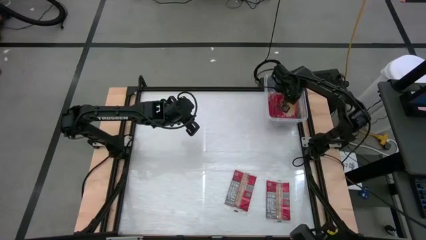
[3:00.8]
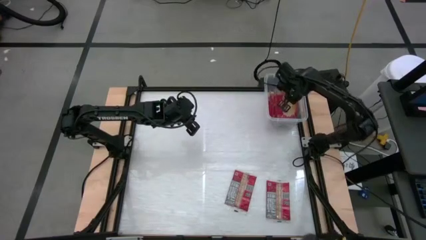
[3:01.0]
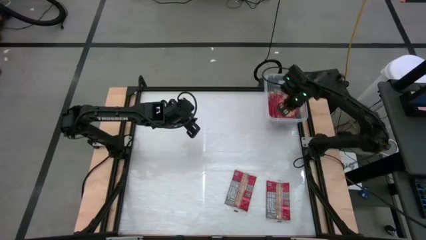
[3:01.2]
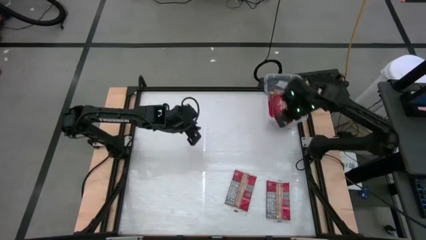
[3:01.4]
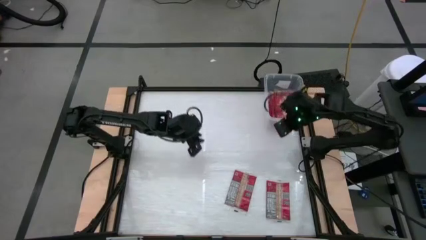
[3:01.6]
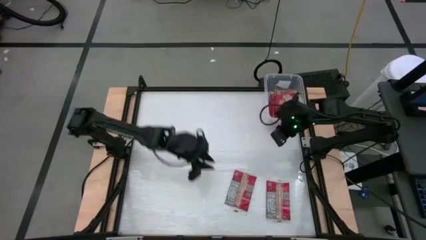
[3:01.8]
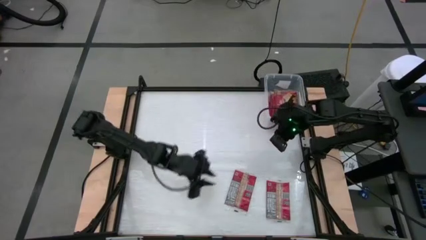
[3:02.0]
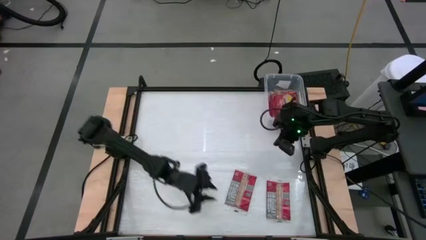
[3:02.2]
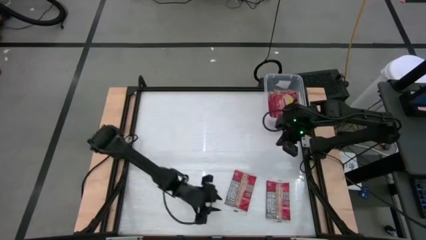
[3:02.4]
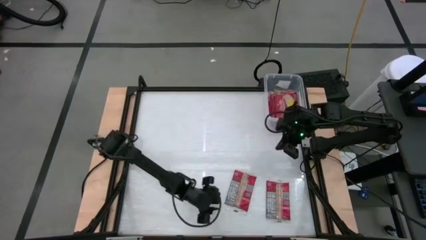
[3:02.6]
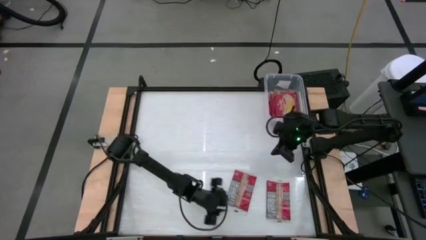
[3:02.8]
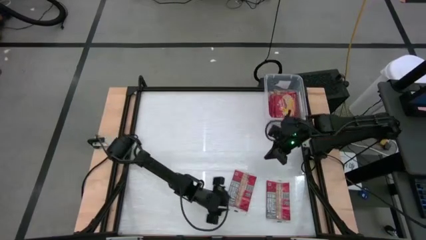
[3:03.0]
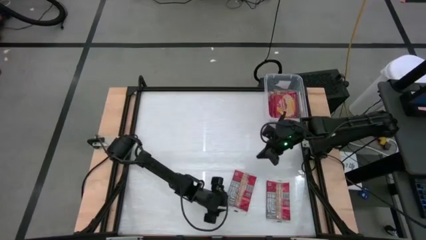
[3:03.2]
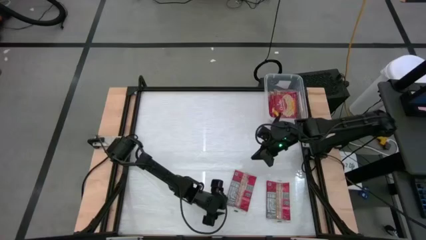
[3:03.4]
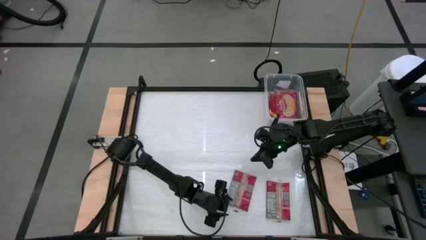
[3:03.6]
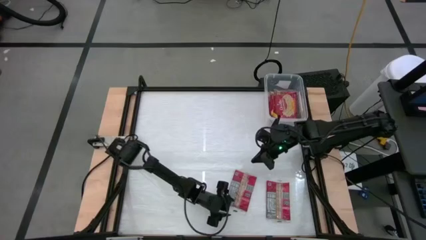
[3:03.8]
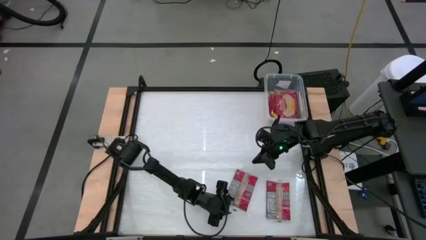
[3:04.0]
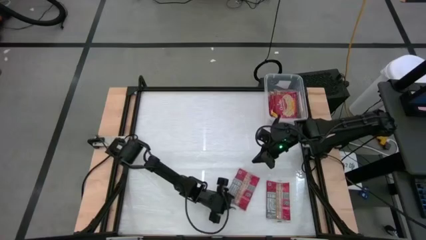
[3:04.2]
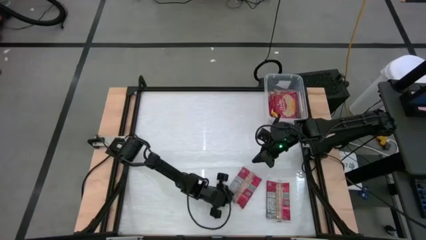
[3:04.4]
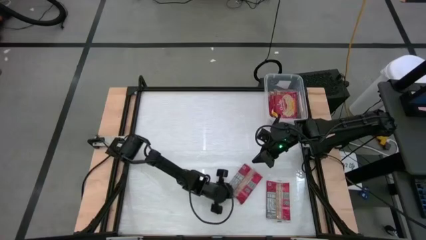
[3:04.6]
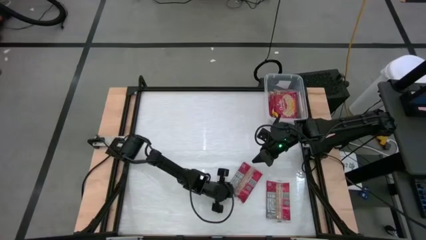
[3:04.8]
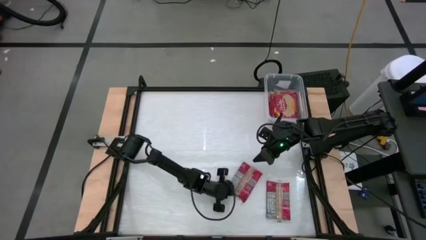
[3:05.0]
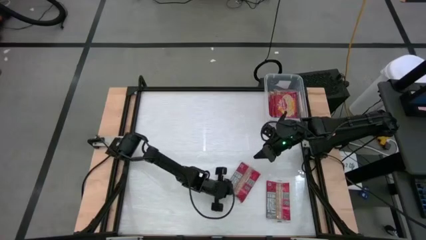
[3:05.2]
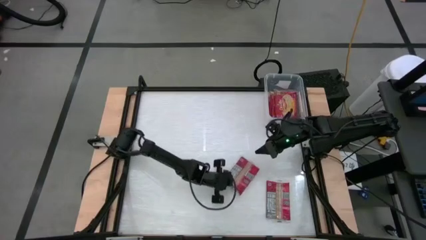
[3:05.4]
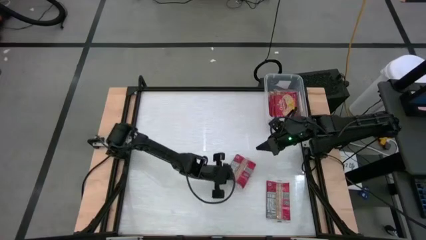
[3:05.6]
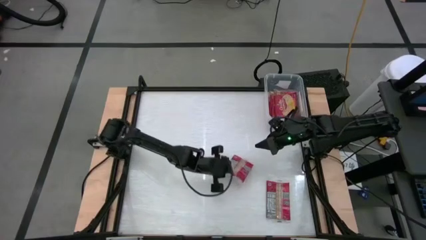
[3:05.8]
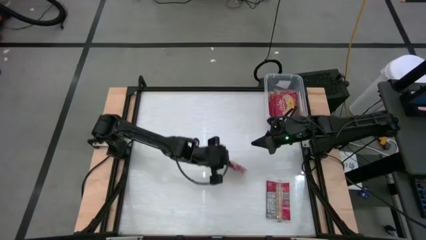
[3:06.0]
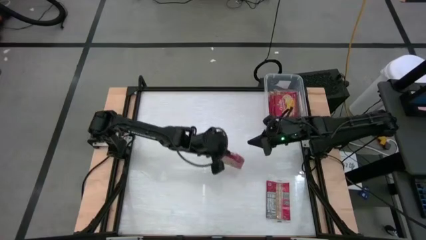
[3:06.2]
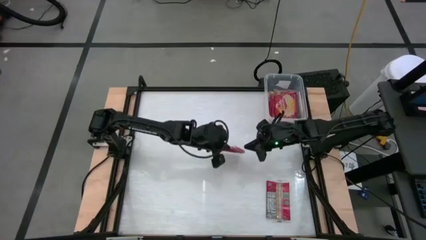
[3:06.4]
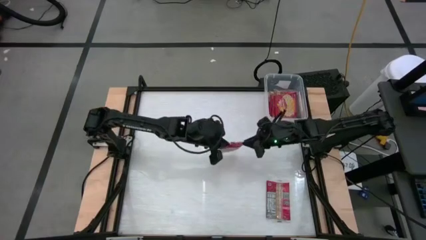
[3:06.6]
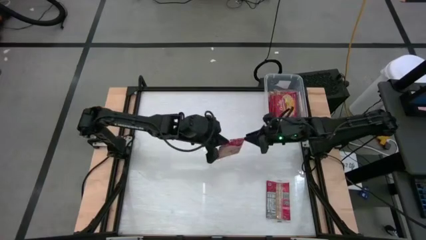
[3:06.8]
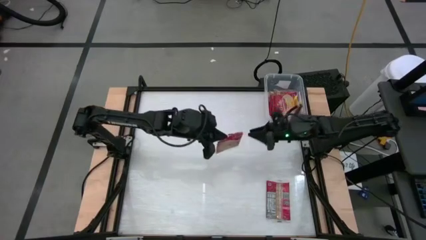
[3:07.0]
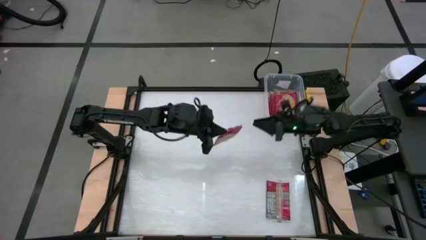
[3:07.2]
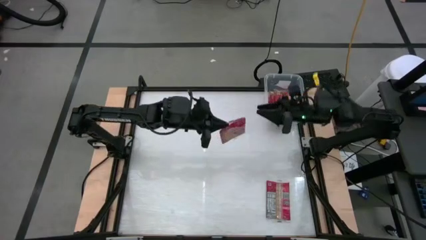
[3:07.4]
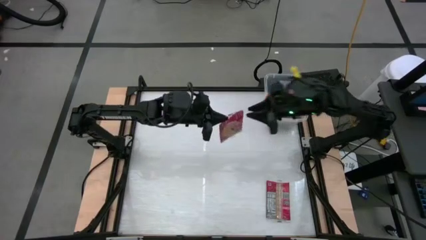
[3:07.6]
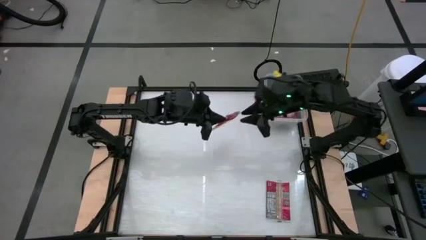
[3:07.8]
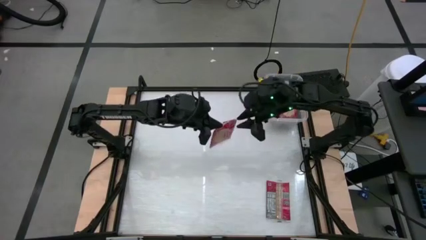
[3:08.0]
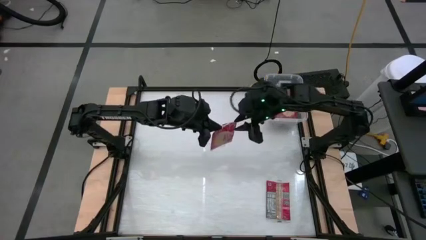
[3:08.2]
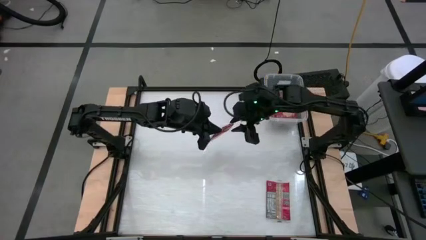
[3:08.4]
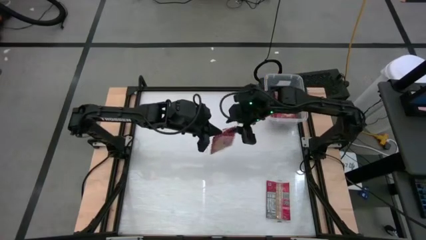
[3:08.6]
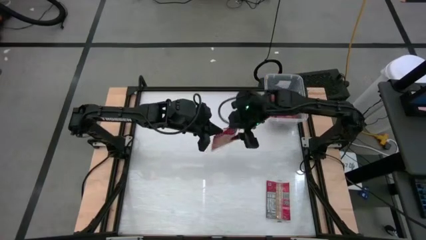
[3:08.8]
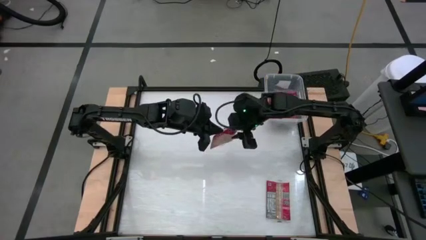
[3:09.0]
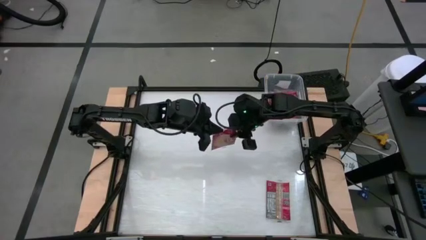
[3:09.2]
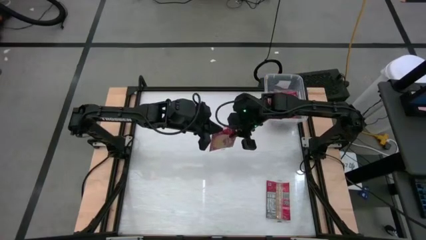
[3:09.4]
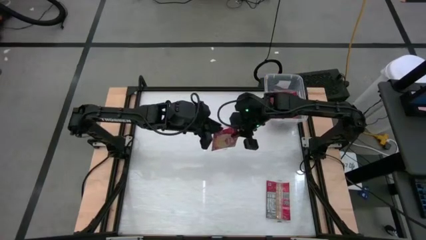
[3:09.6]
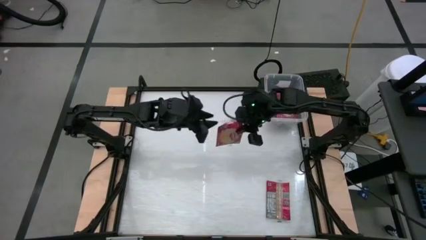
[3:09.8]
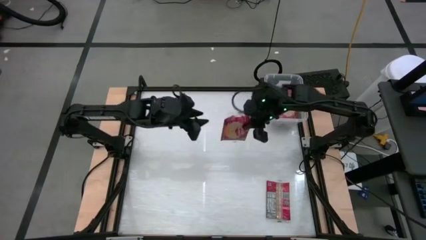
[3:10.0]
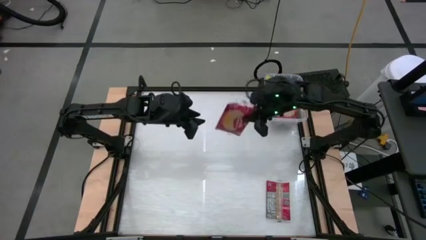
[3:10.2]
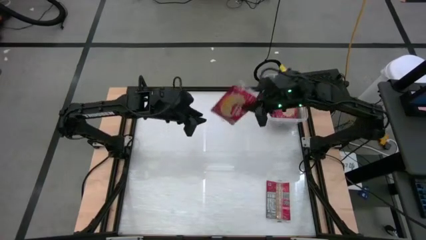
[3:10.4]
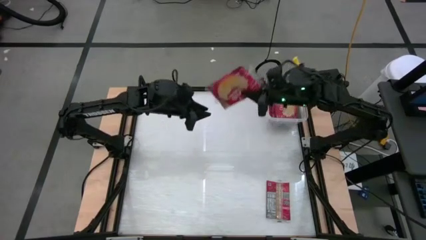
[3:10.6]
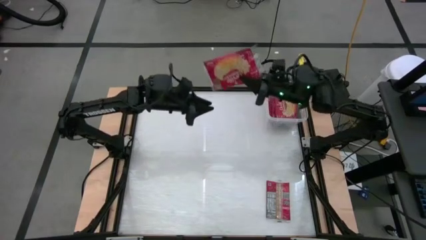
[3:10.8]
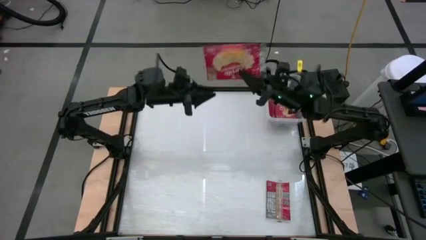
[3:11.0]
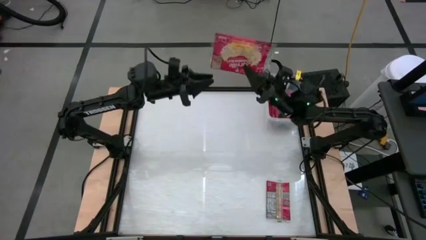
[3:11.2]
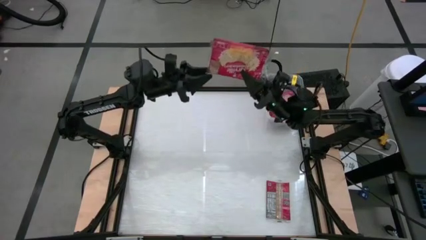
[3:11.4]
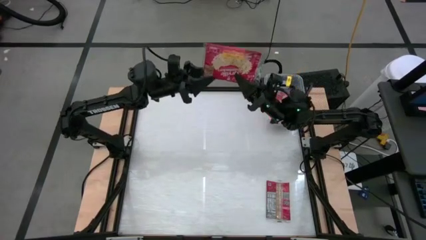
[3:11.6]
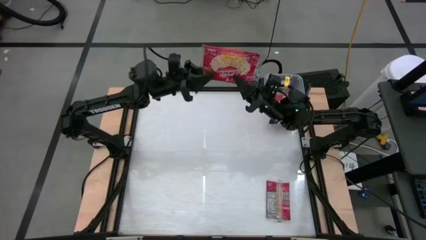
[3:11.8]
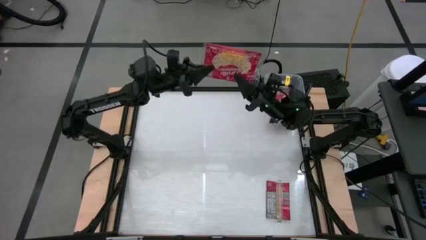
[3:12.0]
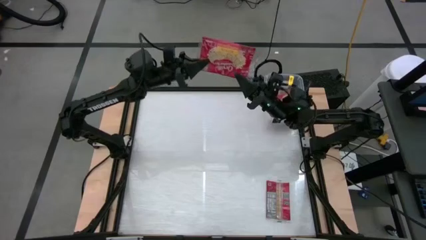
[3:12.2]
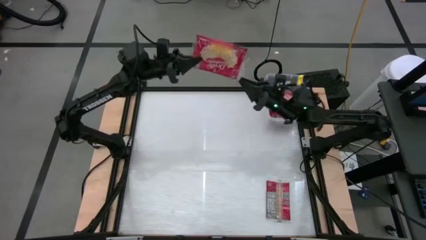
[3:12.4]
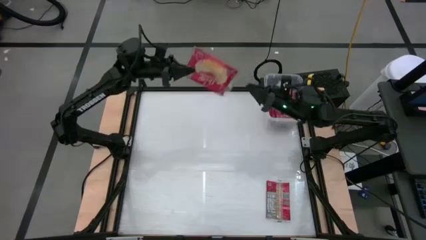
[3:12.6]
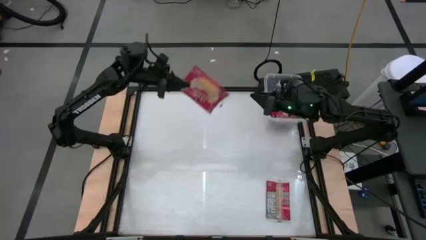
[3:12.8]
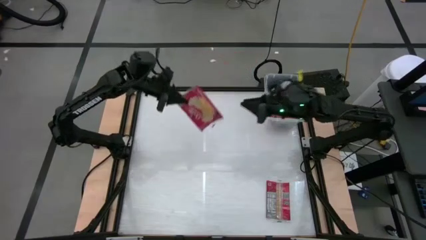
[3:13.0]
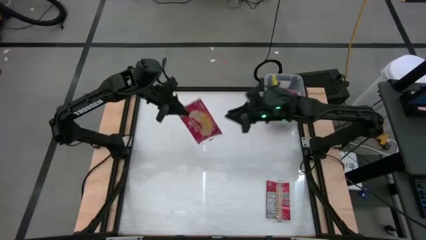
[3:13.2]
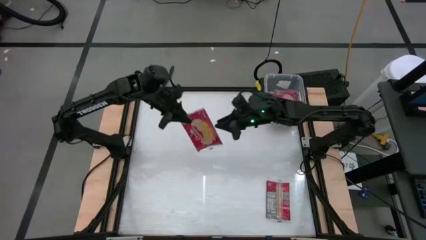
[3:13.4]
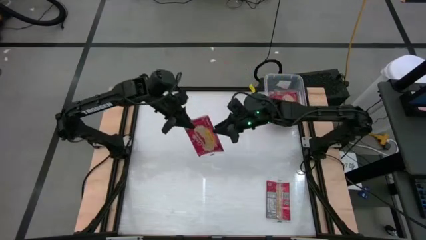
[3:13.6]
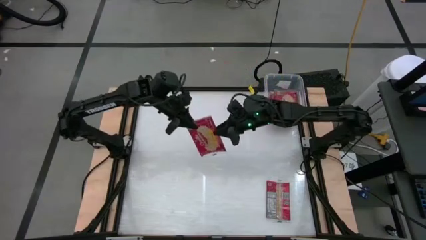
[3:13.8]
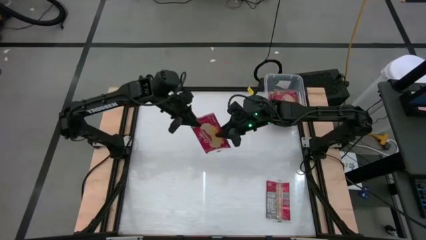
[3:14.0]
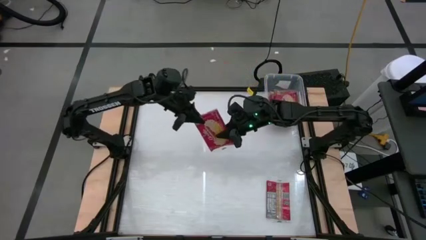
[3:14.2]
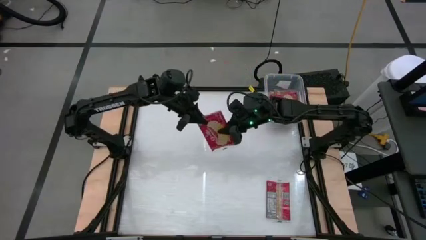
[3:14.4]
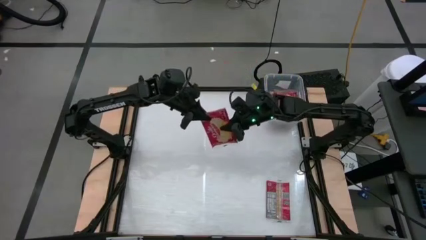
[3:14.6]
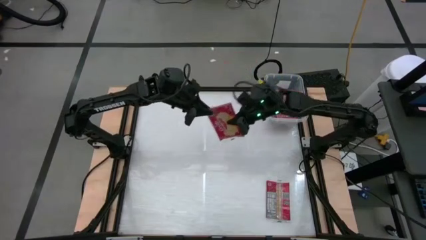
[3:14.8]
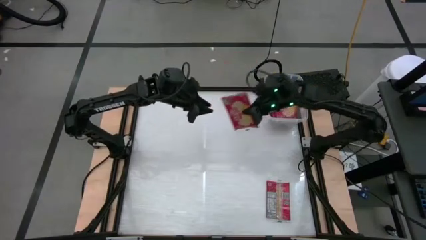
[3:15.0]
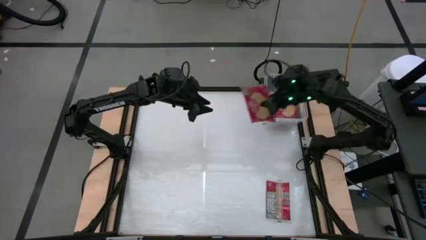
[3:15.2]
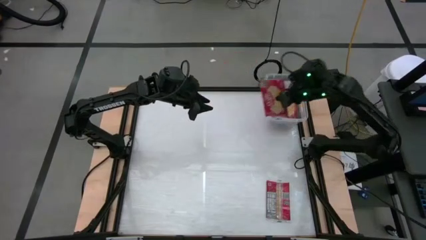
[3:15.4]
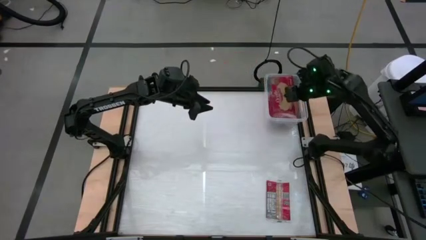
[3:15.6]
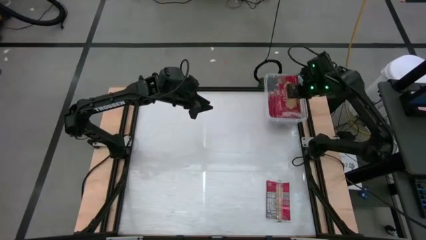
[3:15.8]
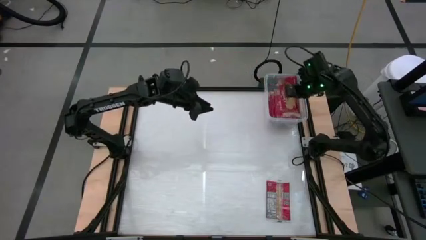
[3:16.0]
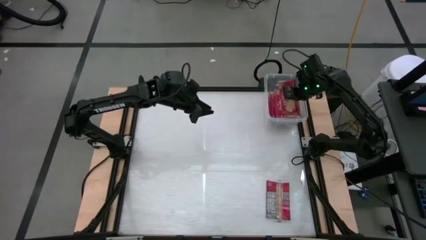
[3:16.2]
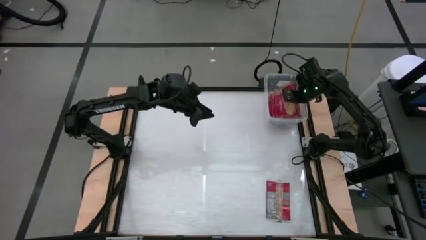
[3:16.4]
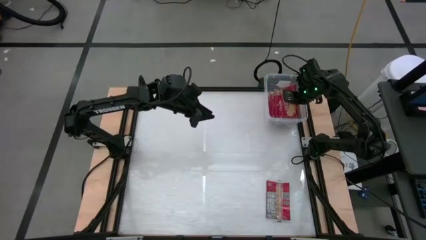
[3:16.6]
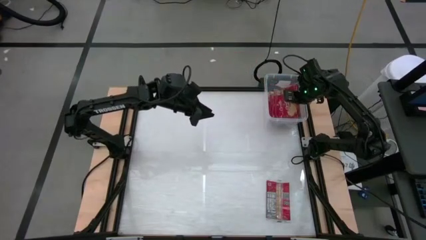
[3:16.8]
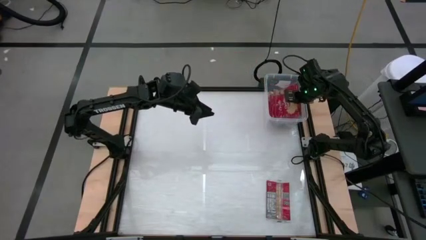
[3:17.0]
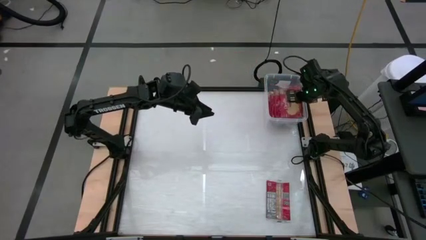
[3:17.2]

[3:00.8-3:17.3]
Task: Sort popcorn bags into baskets
Put the red popcorn bag into the transparent container
